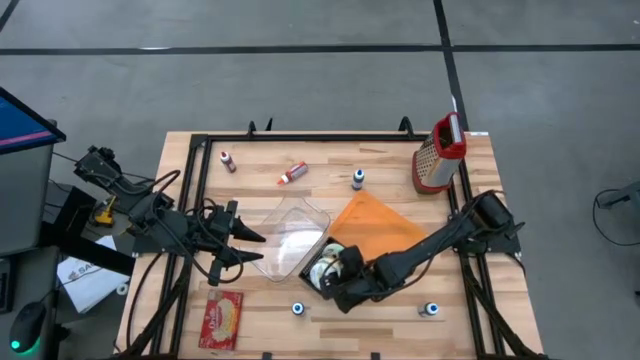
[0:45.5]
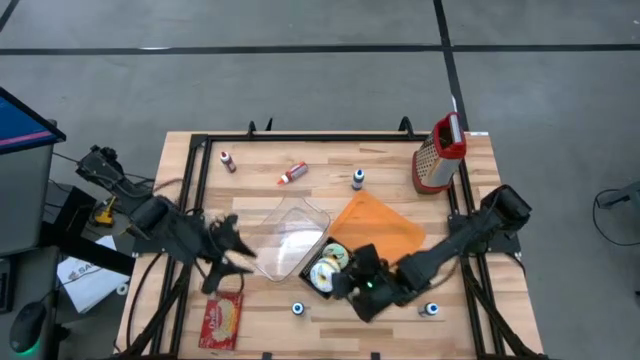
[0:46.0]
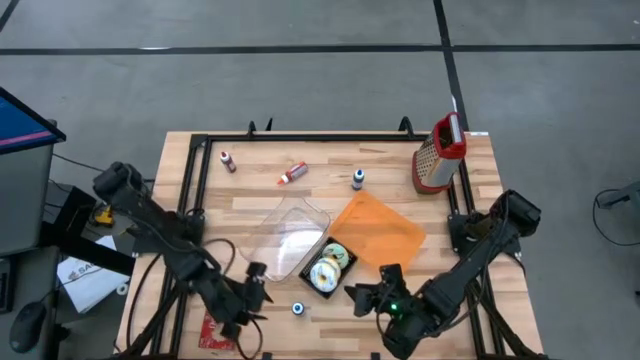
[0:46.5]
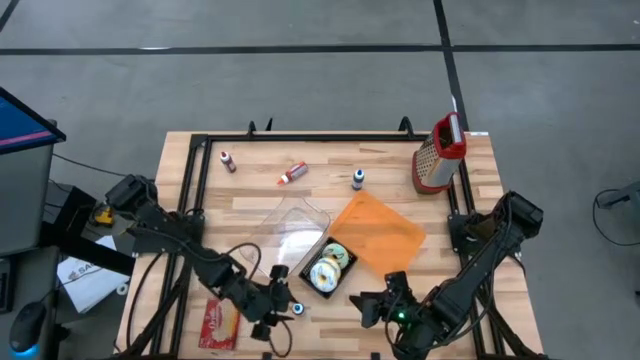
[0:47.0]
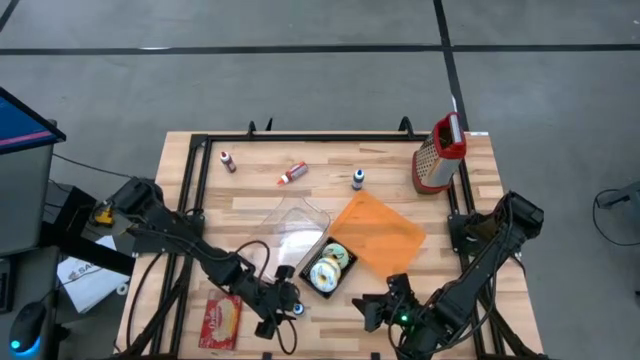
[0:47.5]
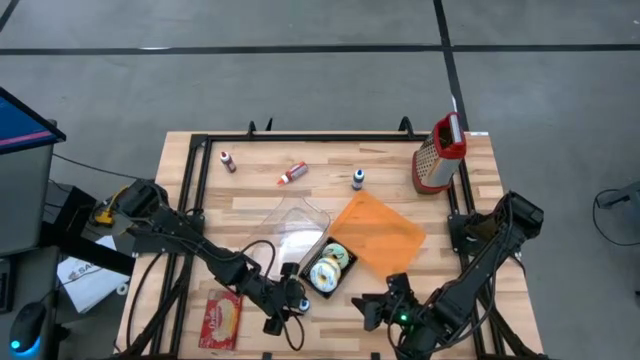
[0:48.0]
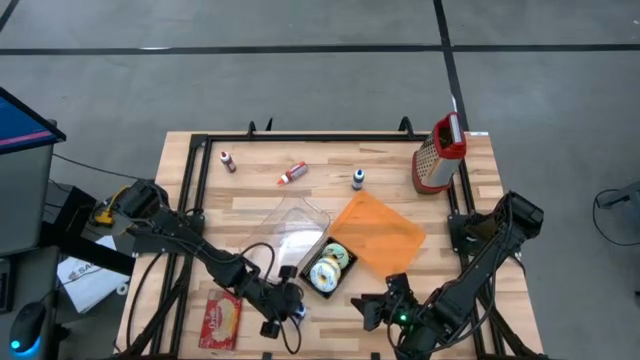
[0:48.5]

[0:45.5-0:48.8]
Put the bottom left blue food coloring bottle into the transparent bin

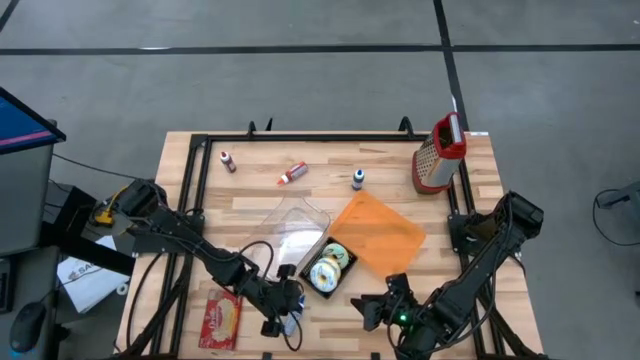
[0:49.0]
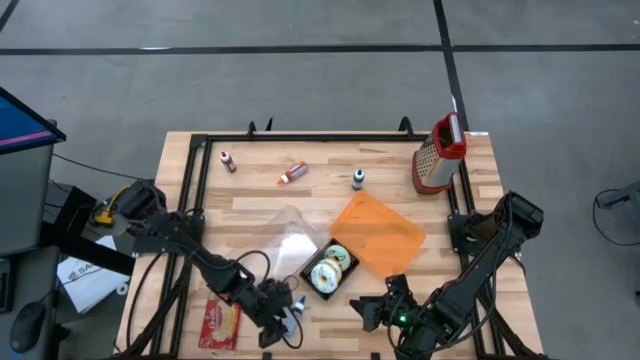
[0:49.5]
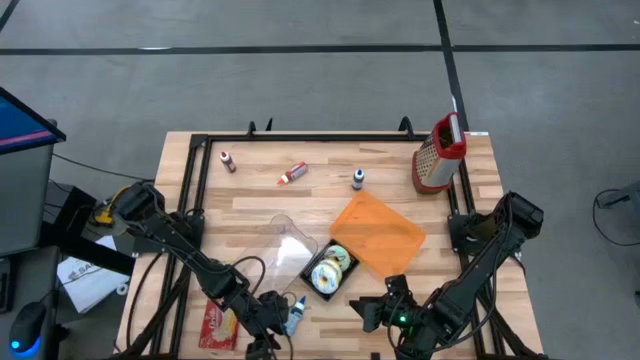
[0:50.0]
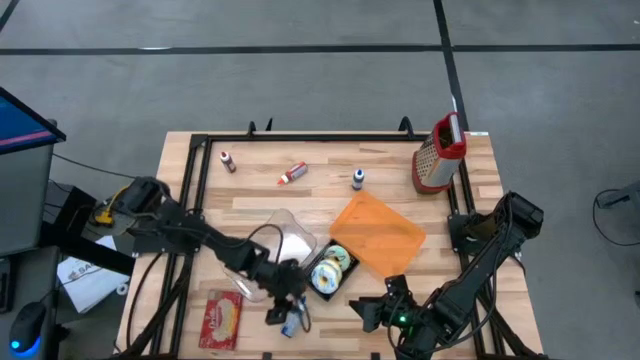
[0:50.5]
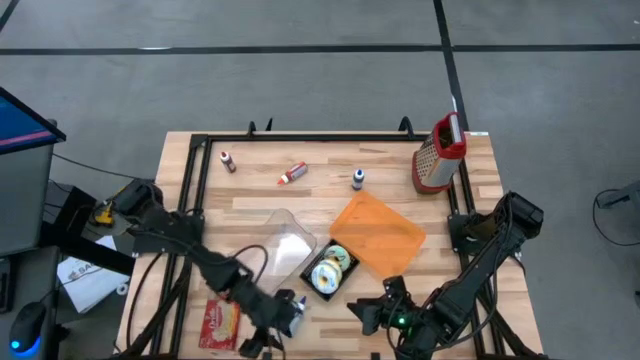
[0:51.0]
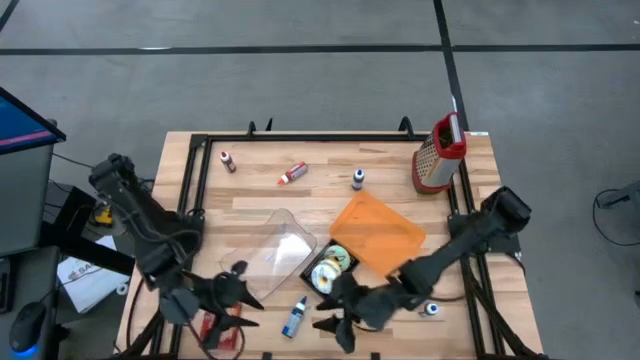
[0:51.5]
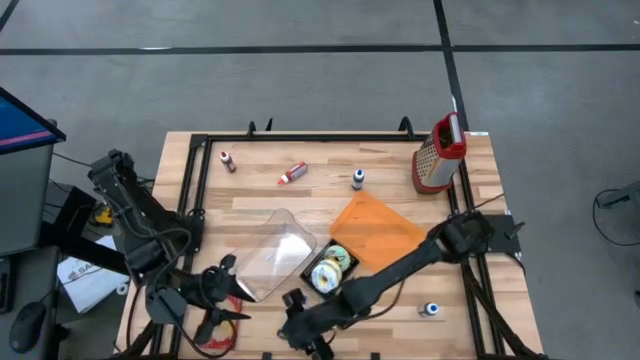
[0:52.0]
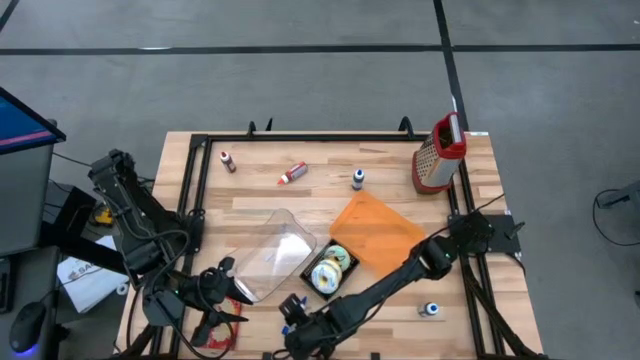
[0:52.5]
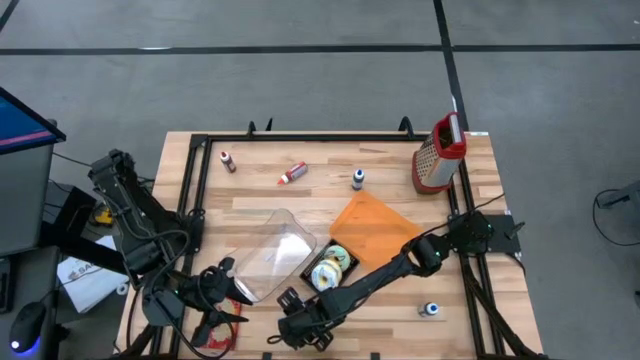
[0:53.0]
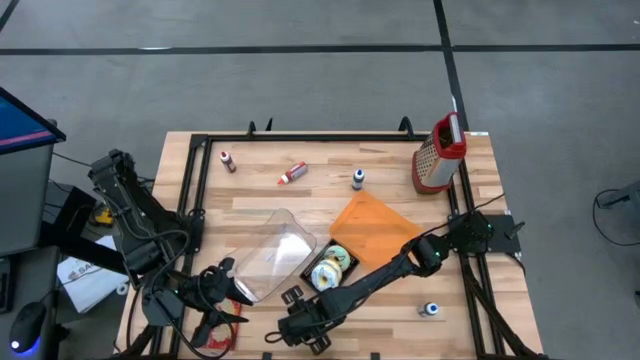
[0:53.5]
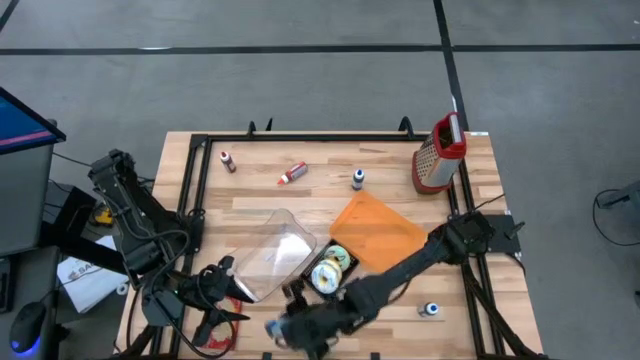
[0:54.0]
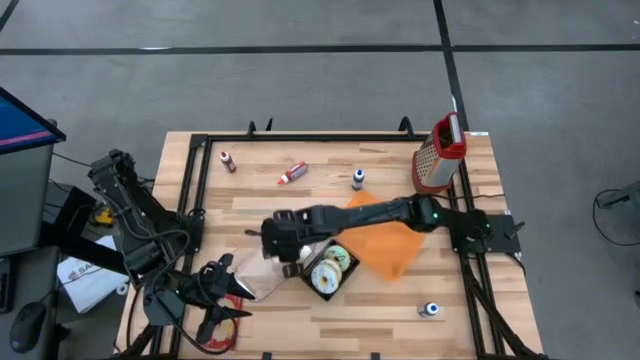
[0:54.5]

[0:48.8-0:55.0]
Put the bottom left blue food coloring bottle into the transparent bin

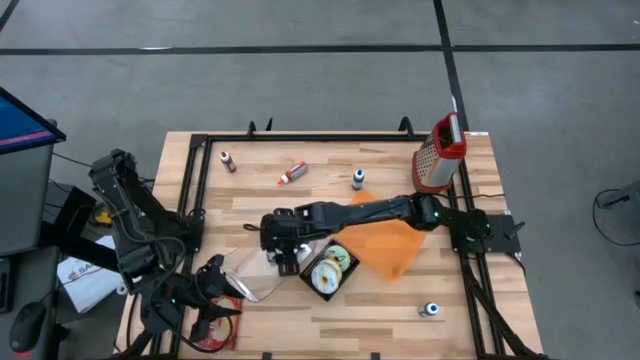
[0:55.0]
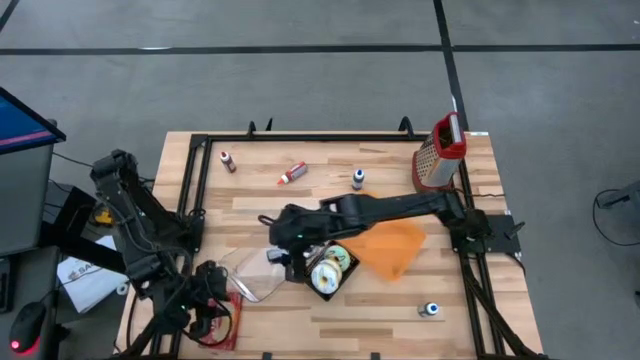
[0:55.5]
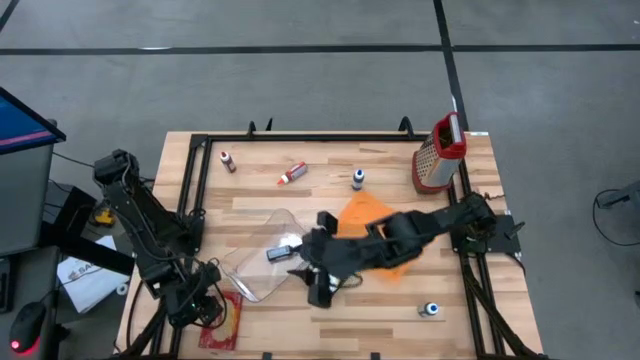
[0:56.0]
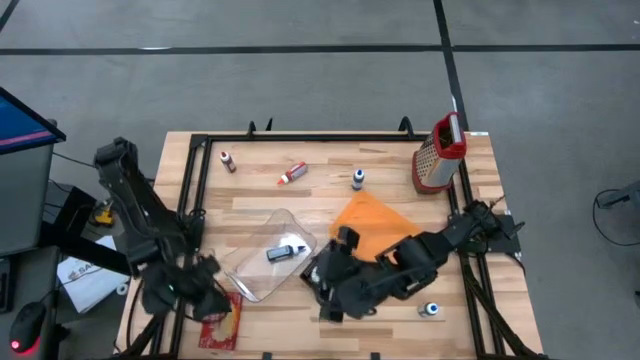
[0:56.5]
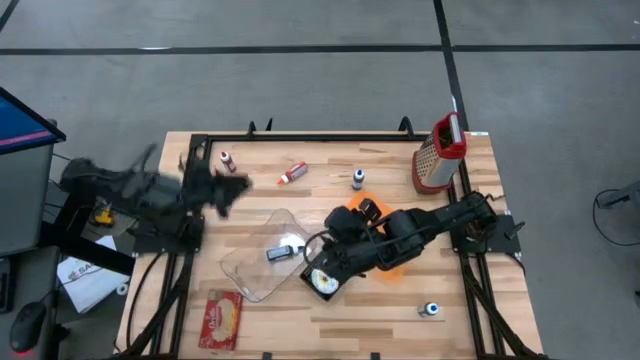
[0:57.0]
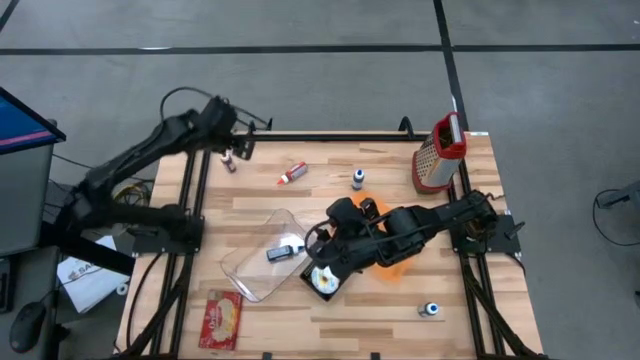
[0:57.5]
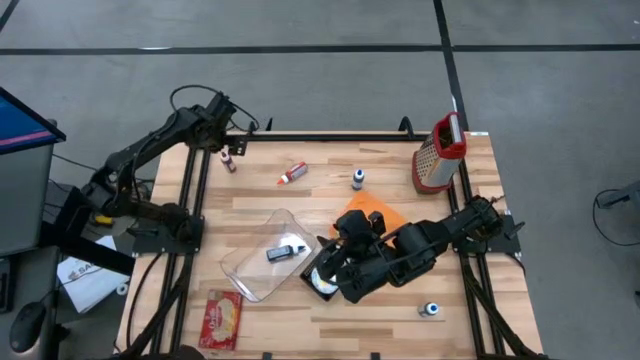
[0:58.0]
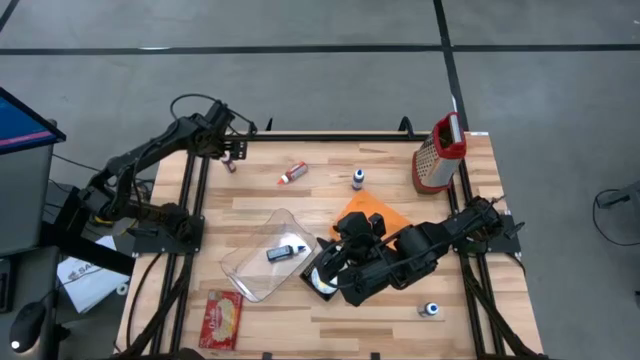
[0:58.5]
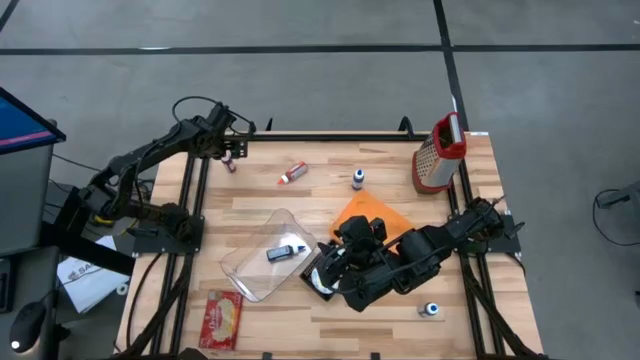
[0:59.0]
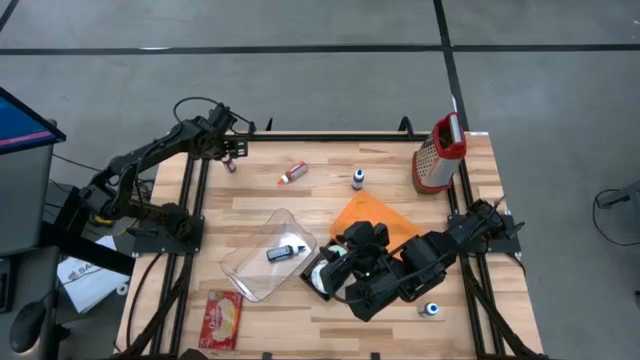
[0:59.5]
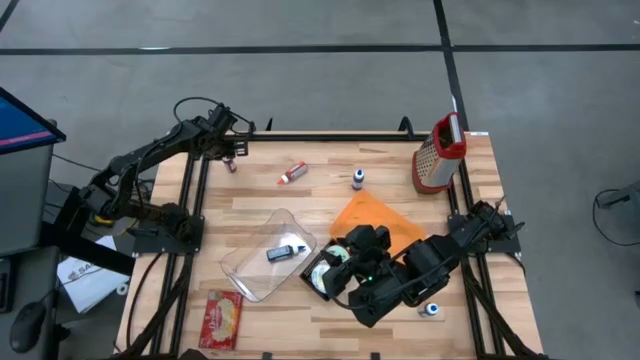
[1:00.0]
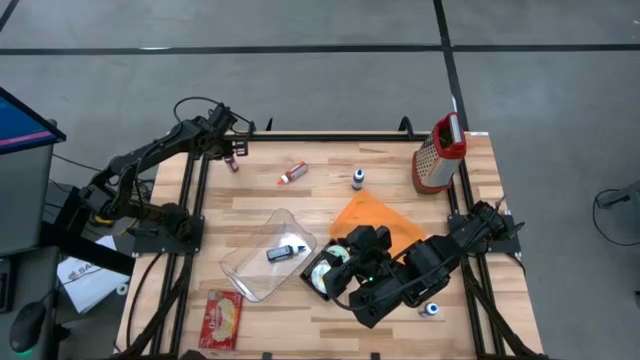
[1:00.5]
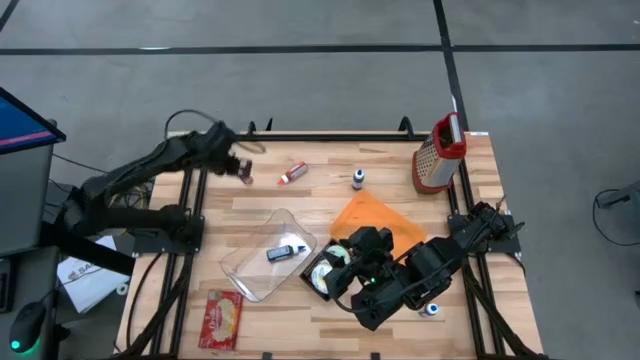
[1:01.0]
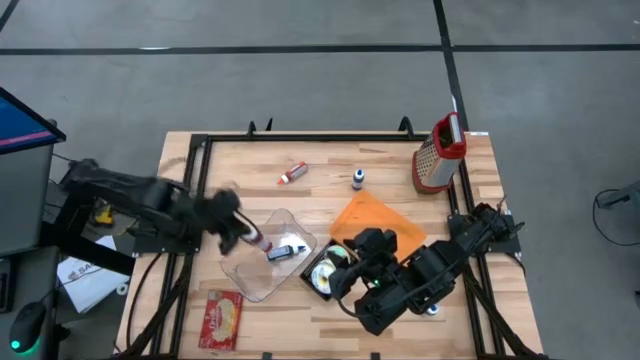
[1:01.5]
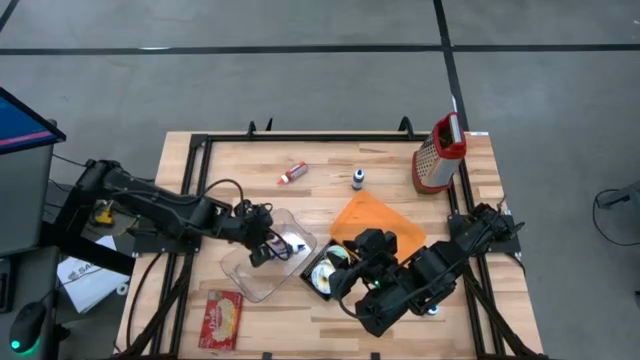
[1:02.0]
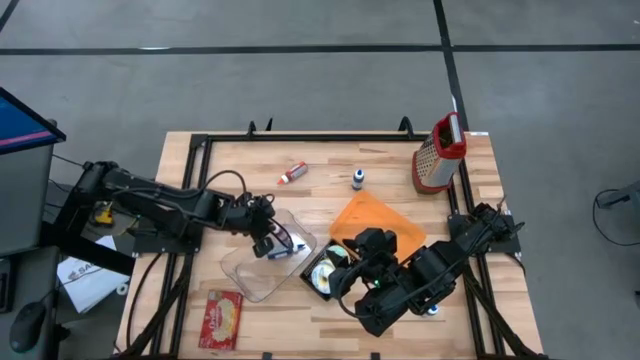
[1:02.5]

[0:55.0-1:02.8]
Put the red food coloring bottle into the transparent bin

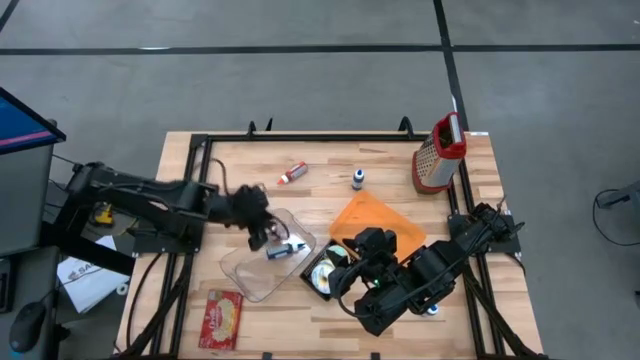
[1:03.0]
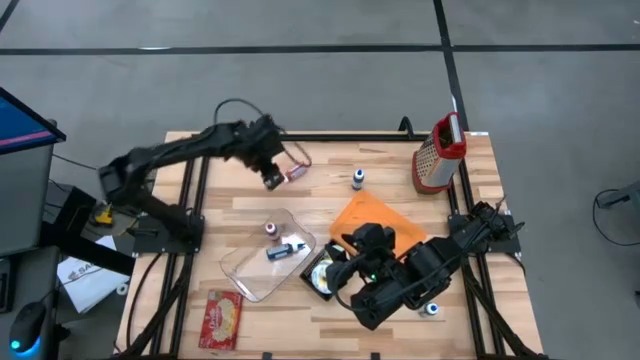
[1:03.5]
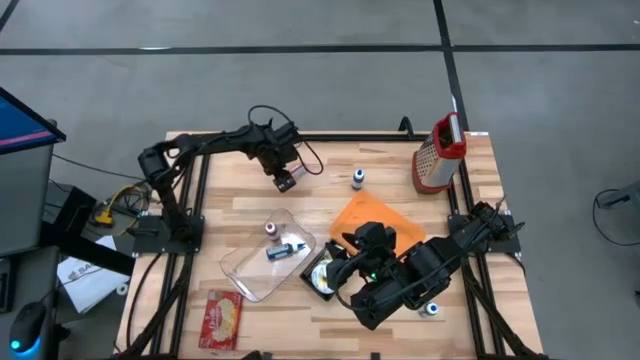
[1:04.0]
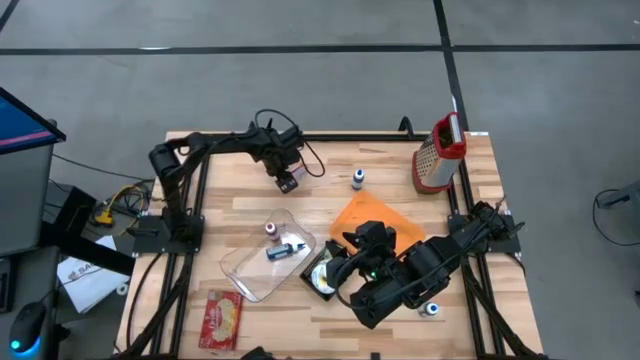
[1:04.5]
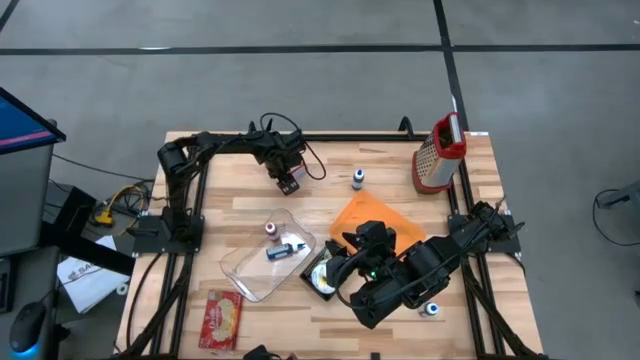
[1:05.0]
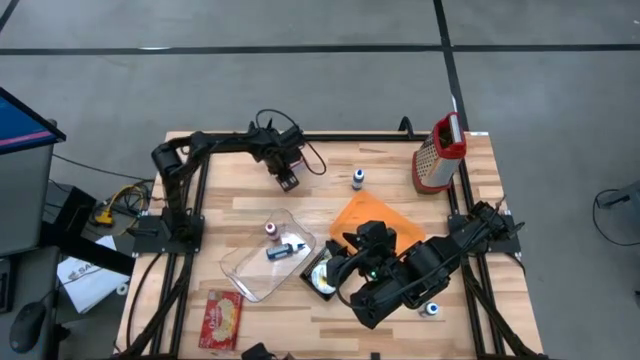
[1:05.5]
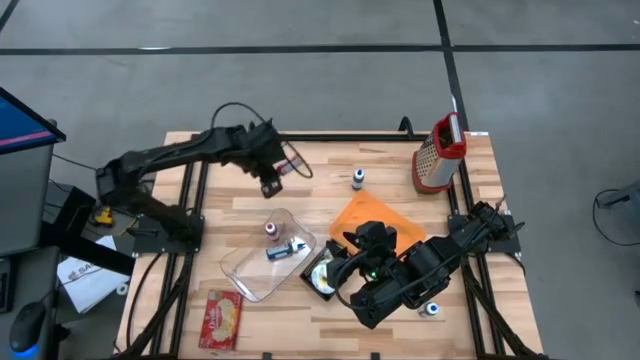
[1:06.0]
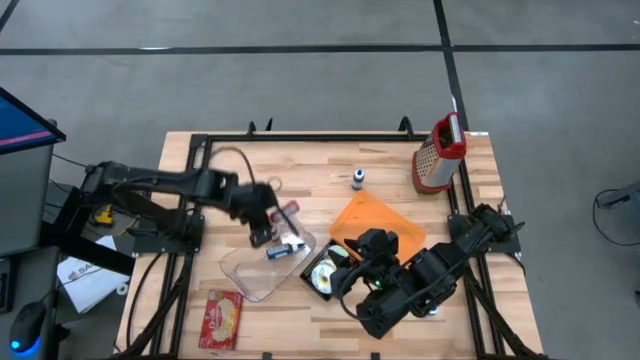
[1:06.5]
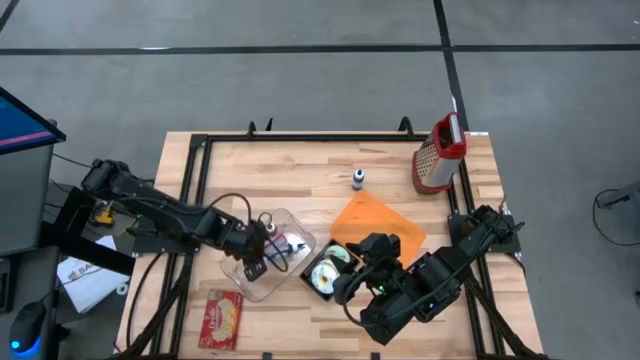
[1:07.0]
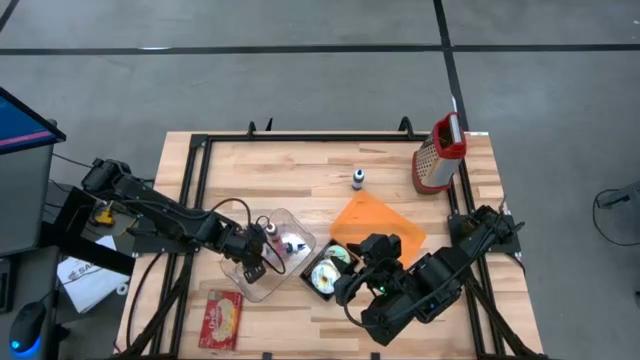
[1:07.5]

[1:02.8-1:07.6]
Put the orange food coloring bottle into the transparent bin
